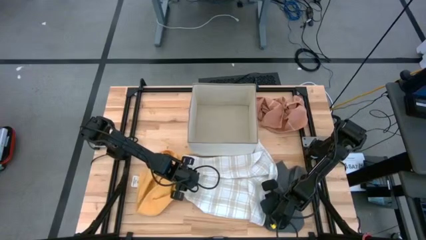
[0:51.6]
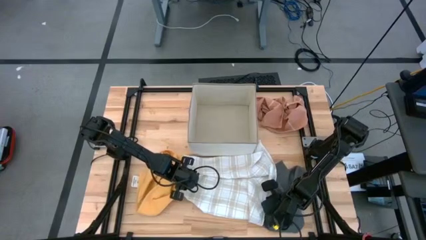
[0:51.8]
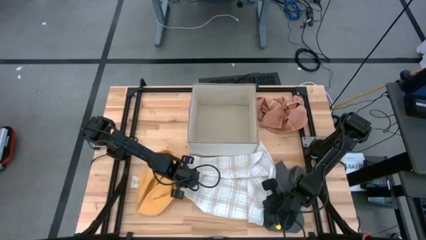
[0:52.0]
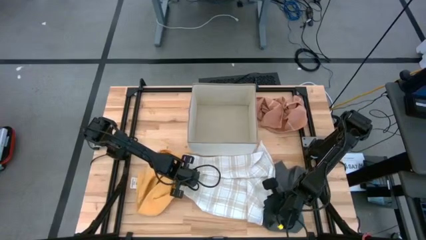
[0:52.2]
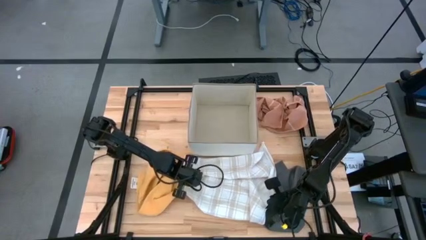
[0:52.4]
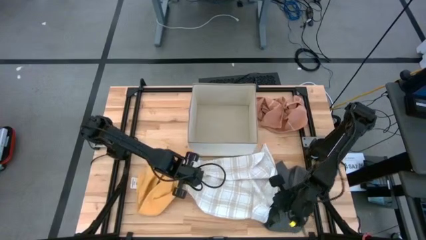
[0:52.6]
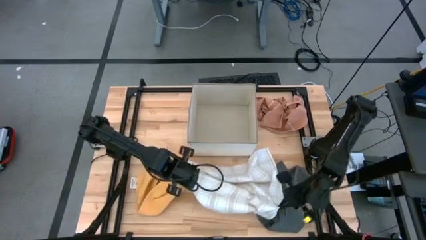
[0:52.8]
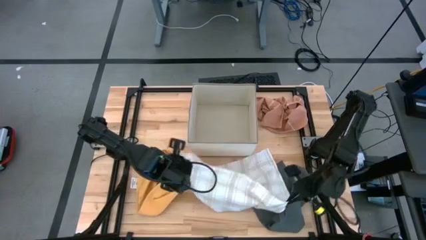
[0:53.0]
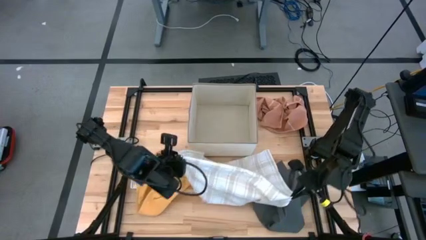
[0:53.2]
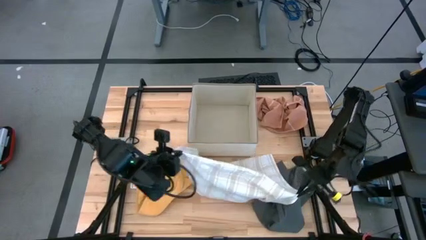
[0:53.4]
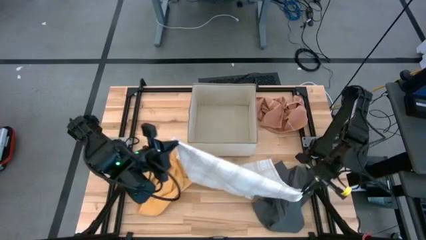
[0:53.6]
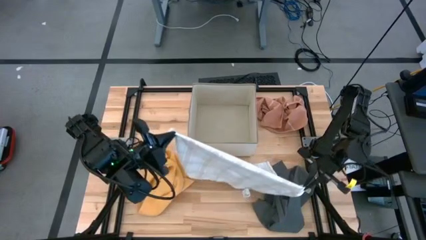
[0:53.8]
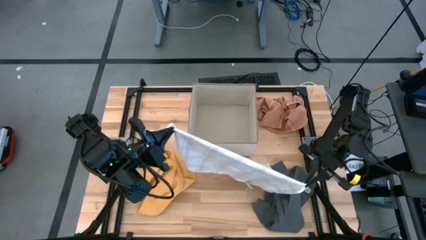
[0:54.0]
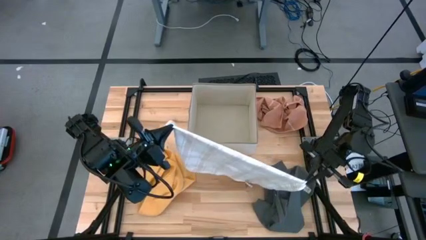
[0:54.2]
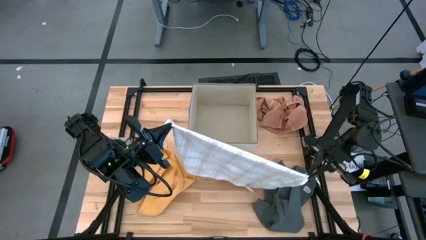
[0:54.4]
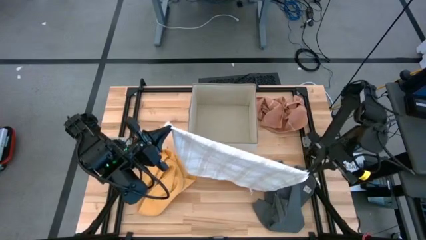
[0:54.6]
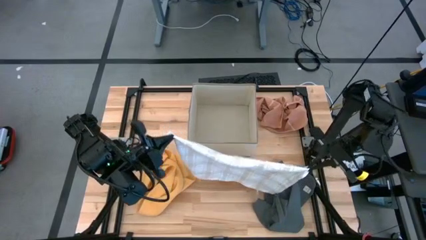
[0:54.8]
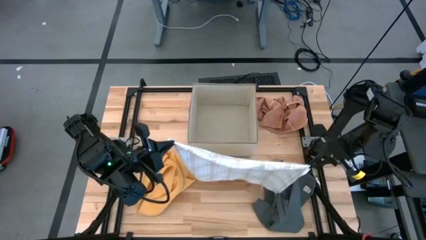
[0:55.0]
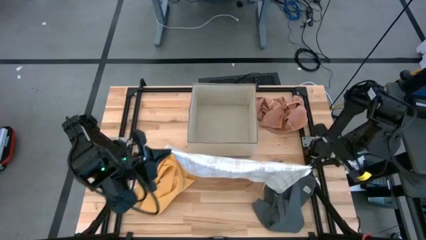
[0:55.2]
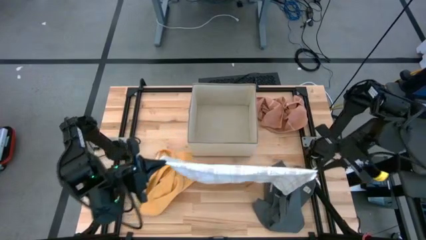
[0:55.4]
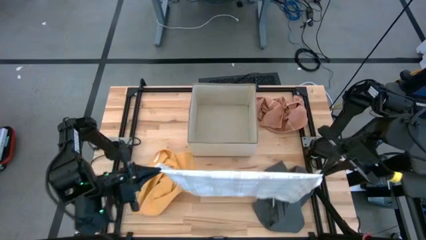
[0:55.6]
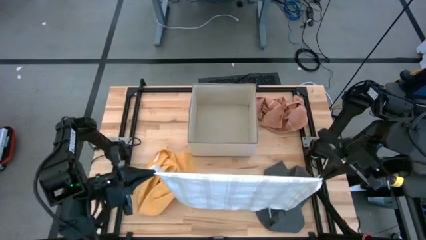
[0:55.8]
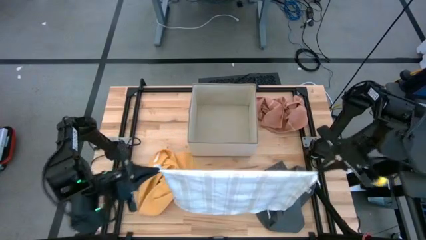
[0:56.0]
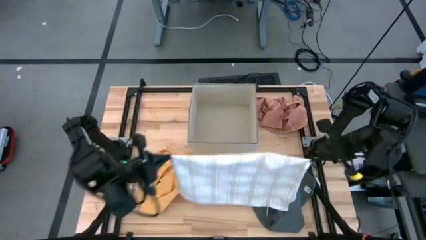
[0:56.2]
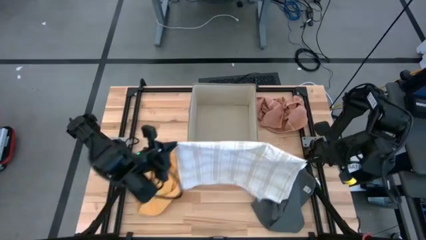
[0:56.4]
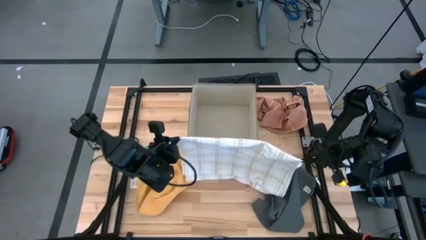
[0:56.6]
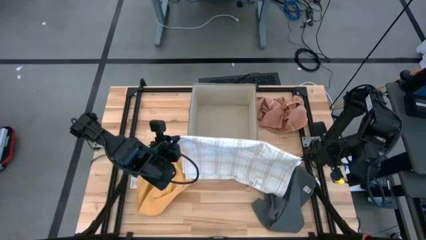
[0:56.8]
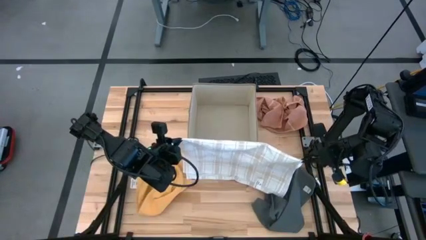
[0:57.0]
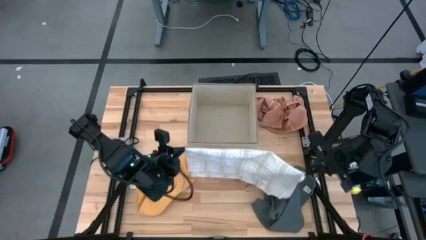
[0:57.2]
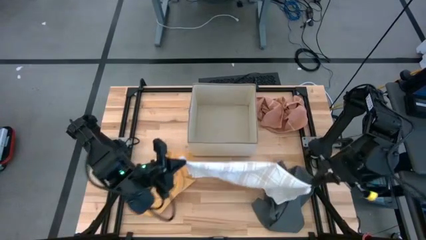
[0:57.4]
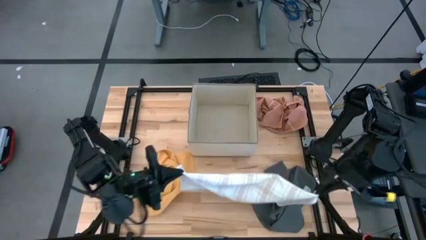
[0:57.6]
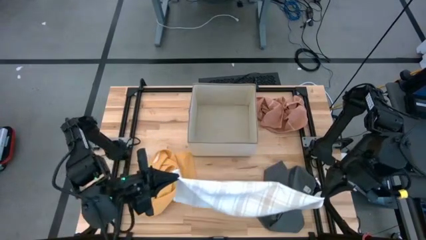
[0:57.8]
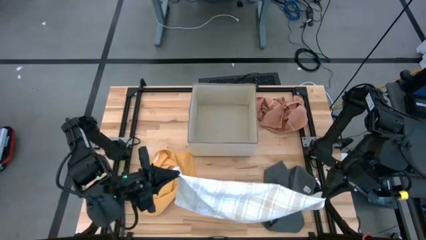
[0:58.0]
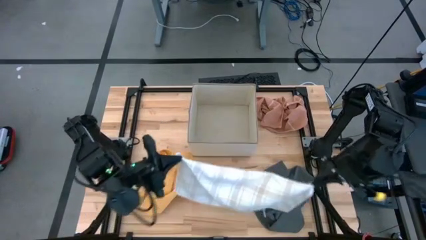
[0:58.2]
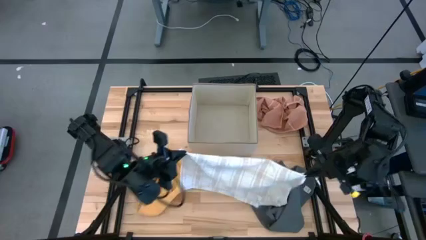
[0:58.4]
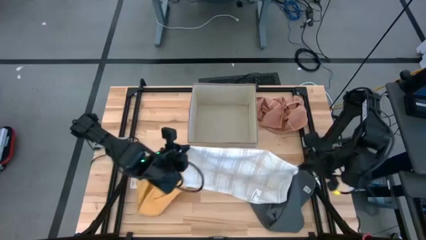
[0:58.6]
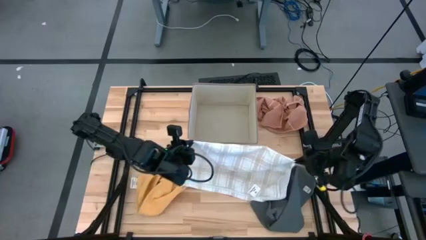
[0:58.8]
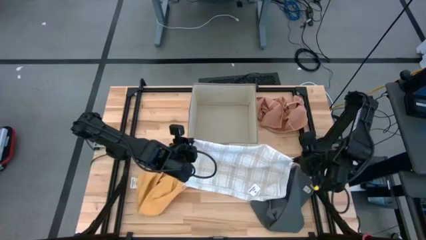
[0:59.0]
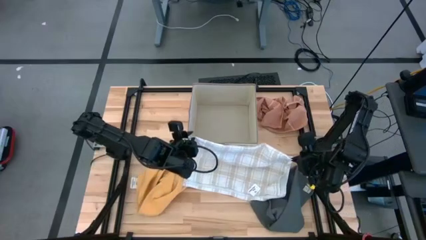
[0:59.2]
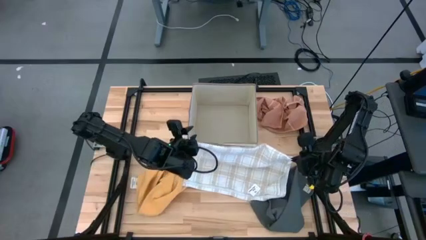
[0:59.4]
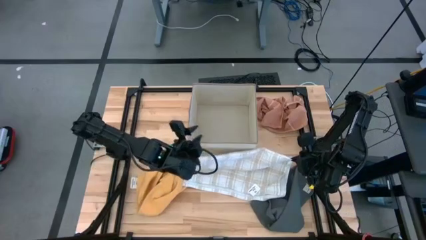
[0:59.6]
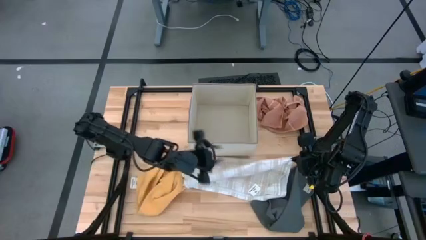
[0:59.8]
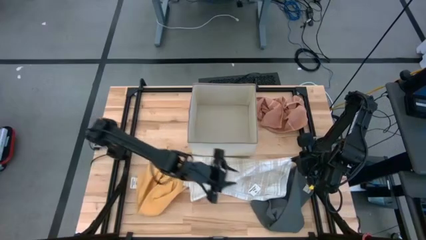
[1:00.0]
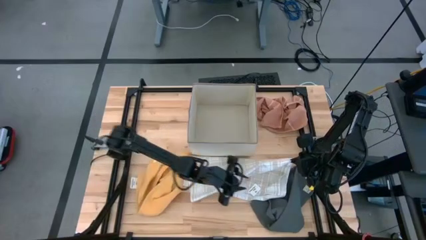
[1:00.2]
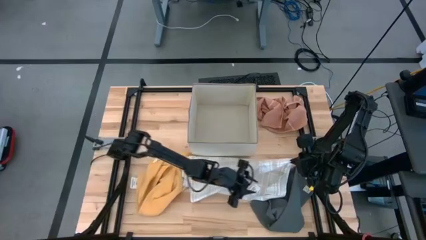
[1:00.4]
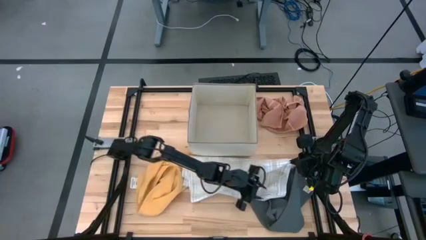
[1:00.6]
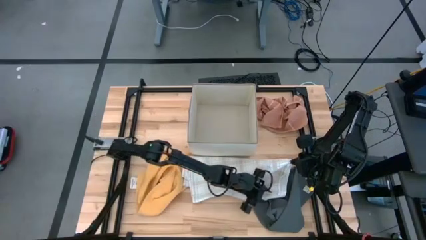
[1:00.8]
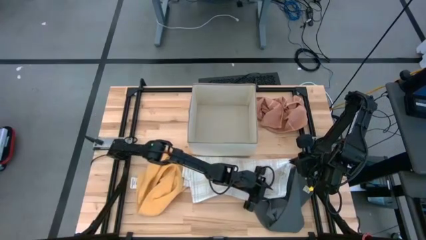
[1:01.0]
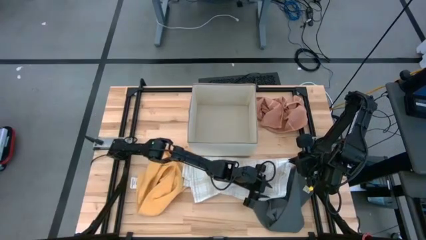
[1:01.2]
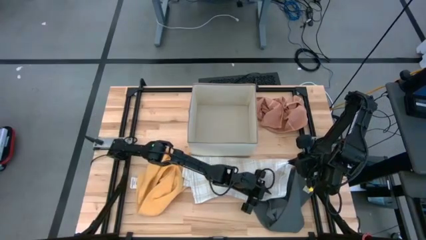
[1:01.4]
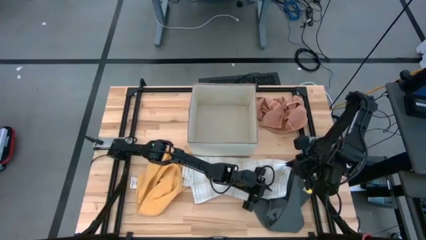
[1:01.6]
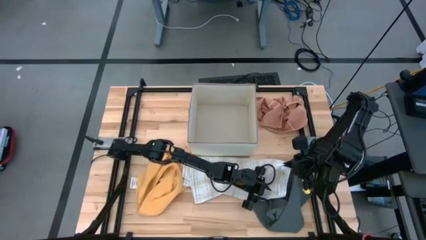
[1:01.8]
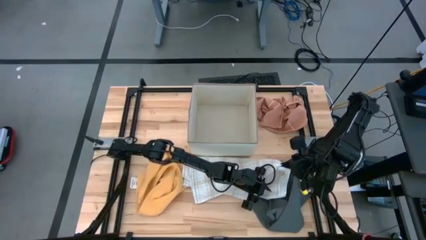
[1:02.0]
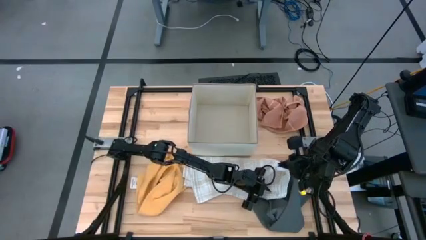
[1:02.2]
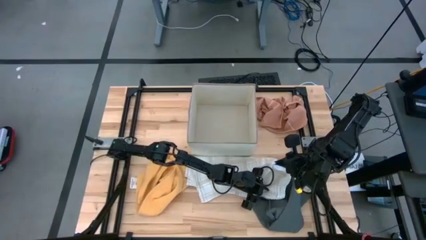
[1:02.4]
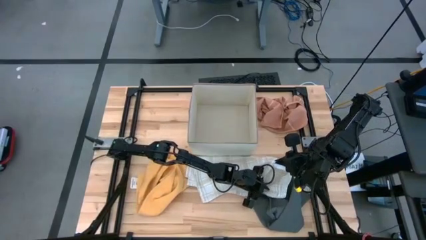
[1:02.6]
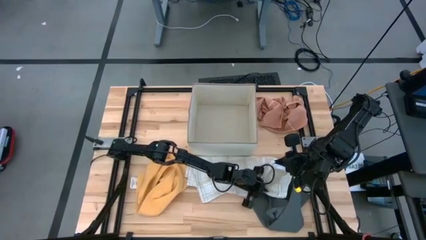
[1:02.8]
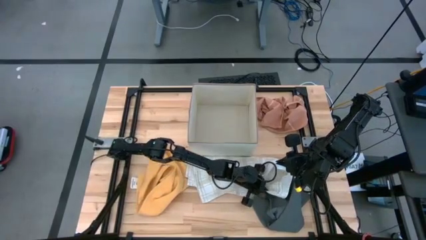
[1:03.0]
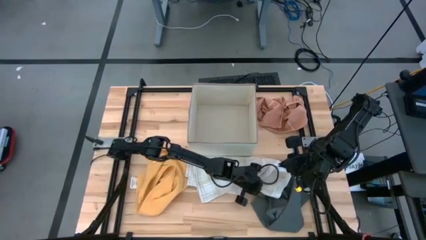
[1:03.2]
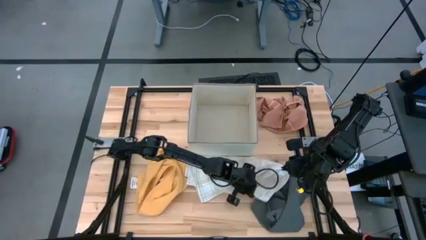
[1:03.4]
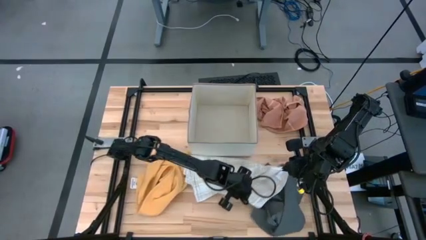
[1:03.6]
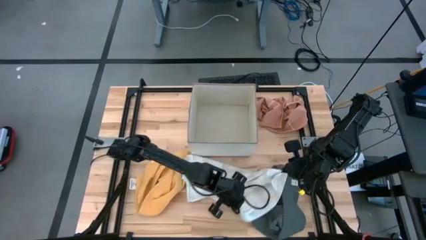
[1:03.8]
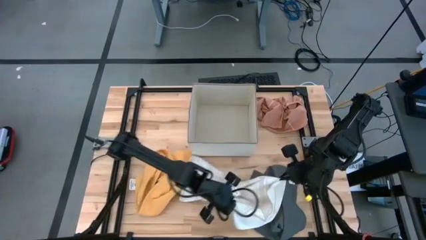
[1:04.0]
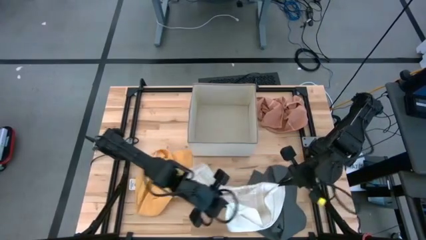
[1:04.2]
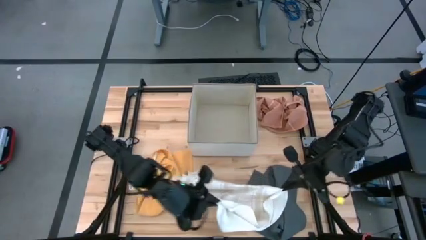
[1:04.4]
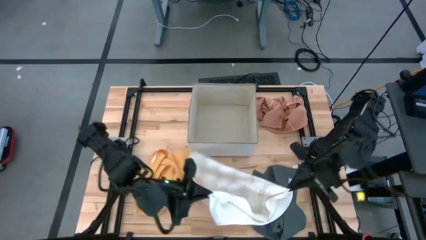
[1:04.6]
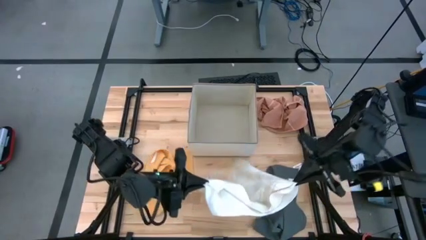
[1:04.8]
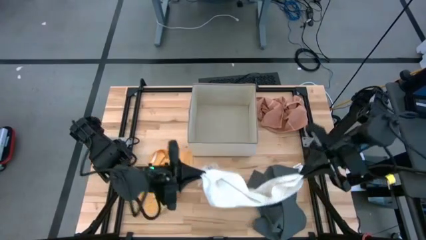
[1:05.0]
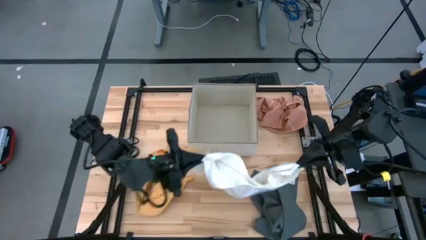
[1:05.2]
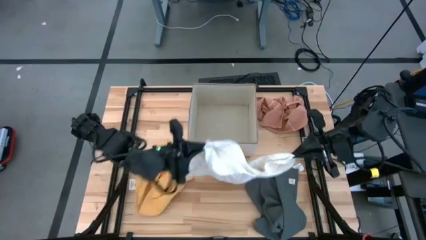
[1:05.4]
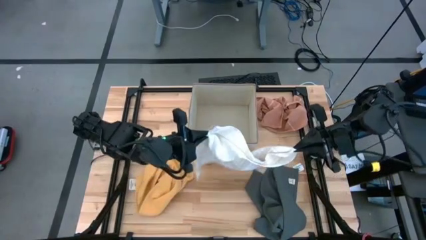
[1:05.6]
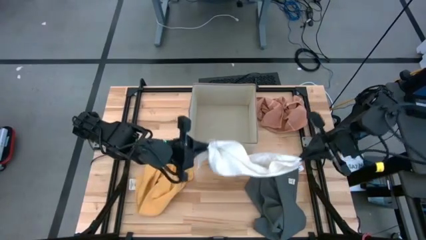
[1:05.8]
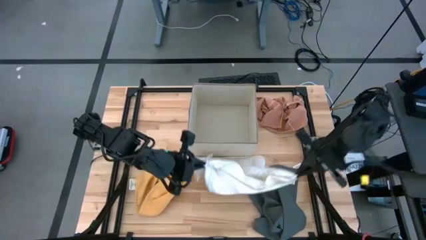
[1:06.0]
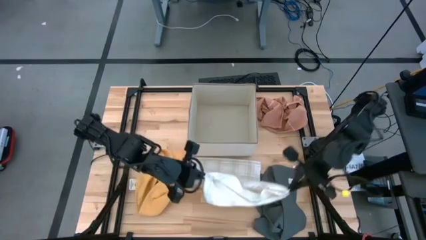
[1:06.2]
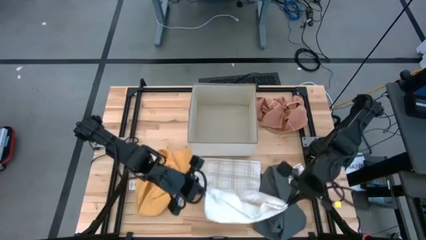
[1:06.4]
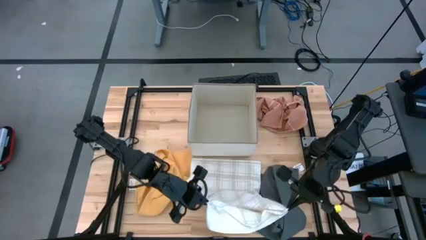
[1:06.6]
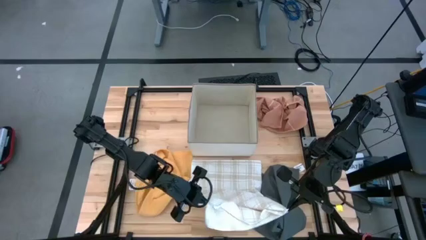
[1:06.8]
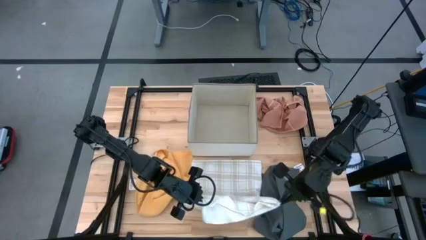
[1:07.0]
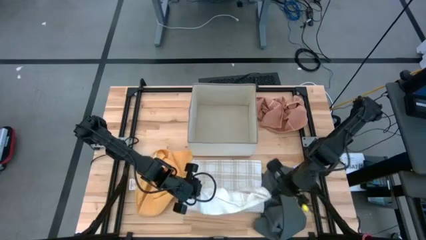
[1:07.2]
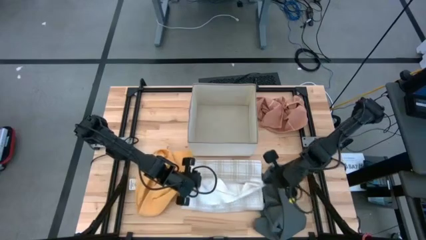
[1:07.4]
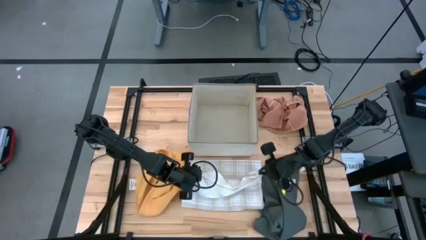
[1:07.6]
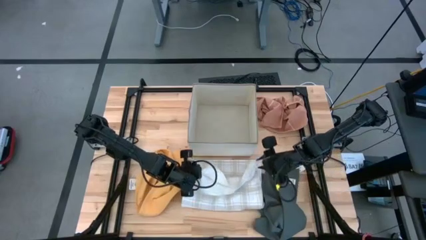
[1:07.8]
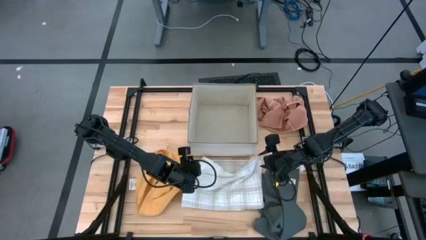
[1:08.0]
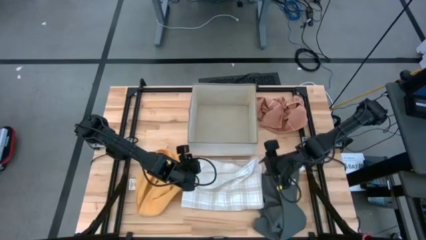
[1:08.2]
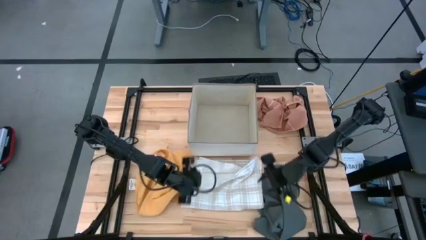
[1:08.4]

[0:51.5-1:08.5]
Task: Fold towel
Fold the white towel with brown checkered lines

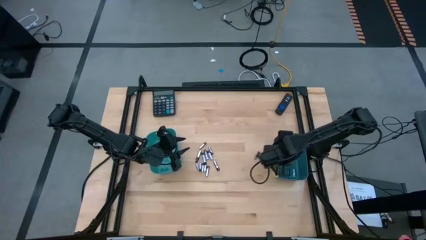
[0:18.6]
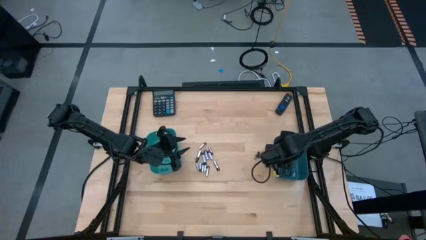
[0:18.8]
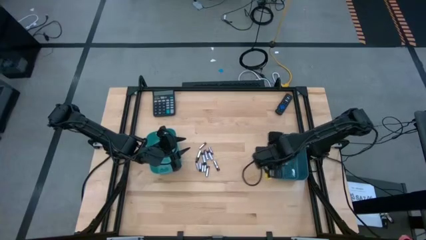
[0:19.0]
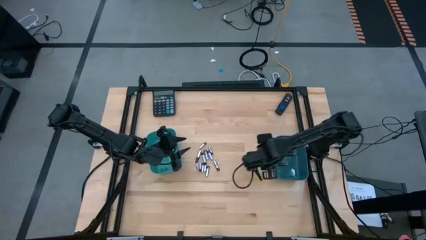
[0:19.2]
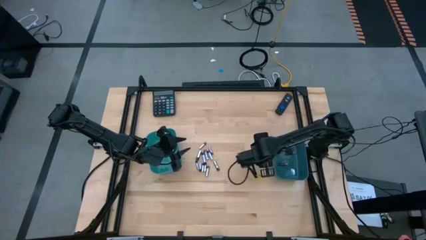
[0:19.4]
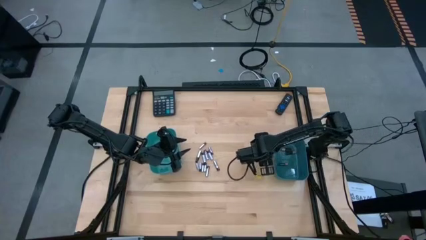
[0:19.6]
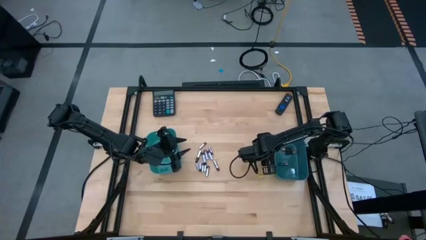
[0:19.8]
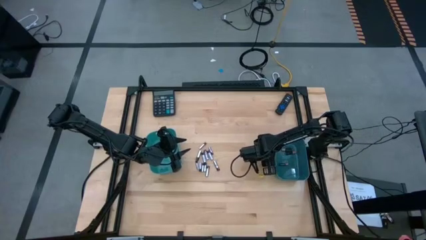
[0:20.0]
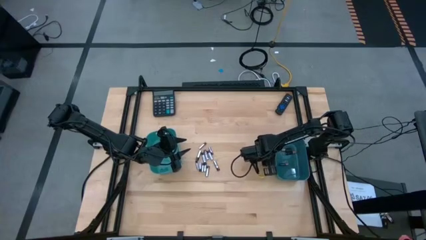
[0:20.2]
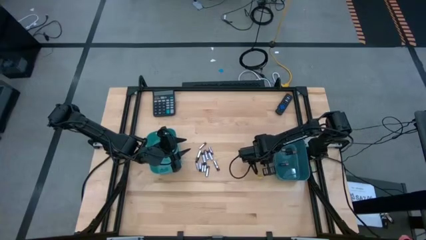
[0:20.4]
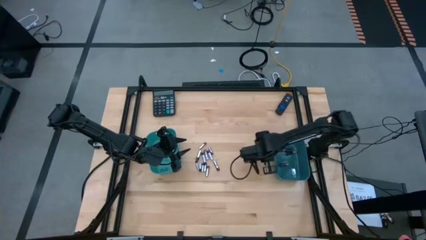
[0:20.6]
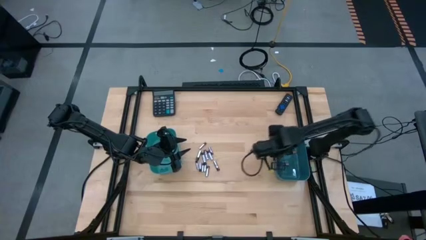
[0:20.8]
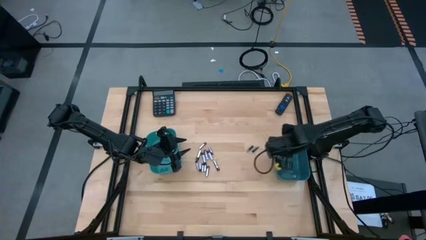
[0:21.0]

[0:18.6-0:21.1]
Task: Sort batteries
Put the black battery into the right blue bin
